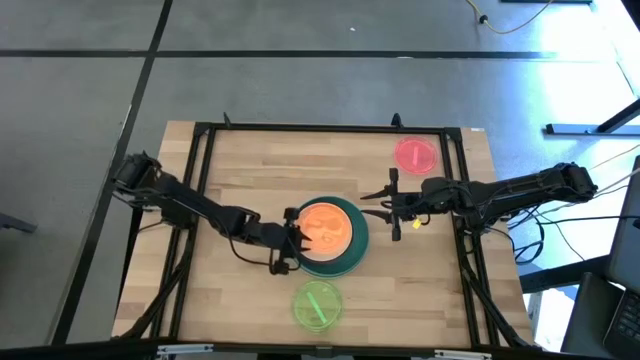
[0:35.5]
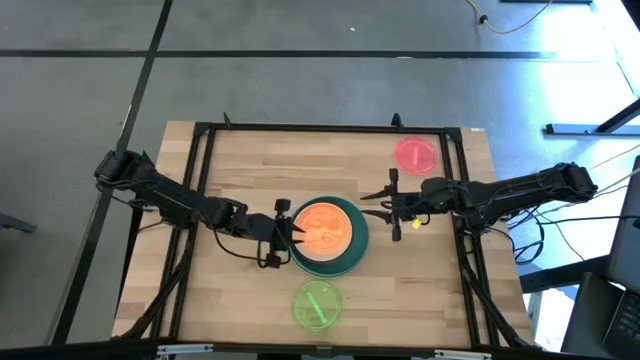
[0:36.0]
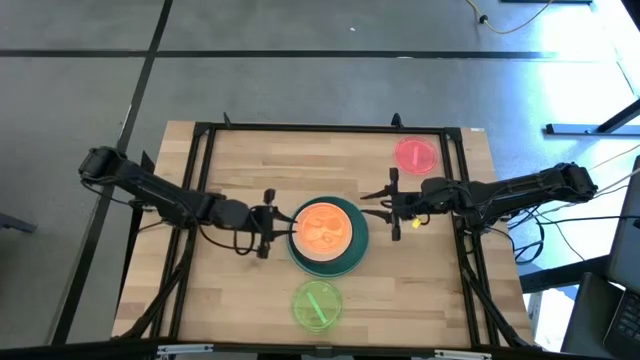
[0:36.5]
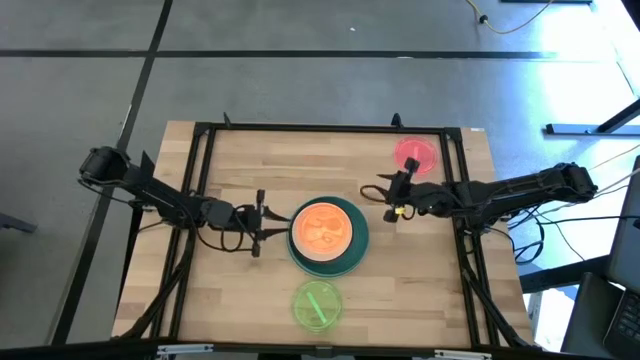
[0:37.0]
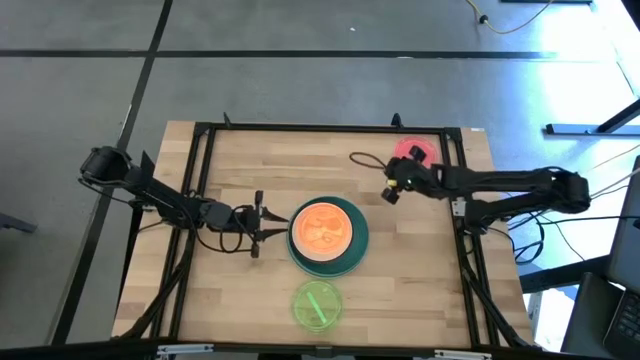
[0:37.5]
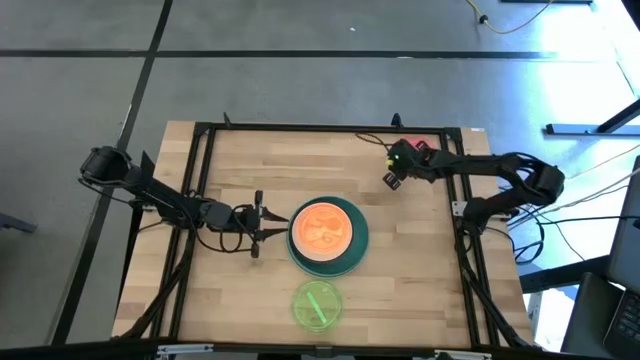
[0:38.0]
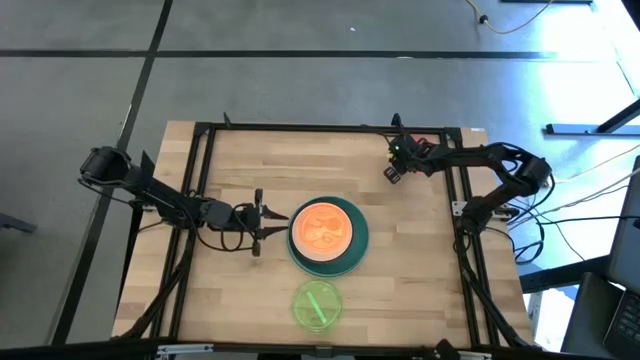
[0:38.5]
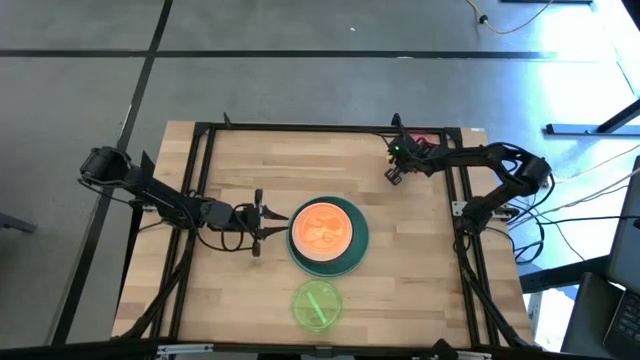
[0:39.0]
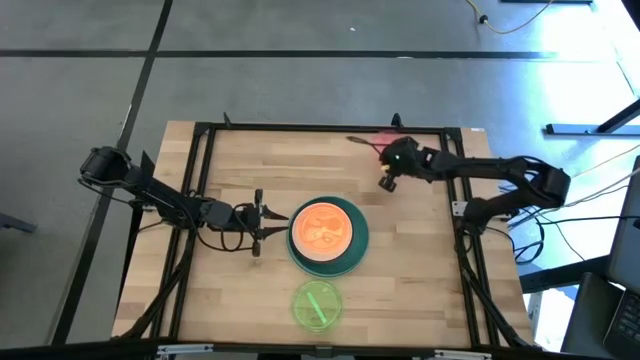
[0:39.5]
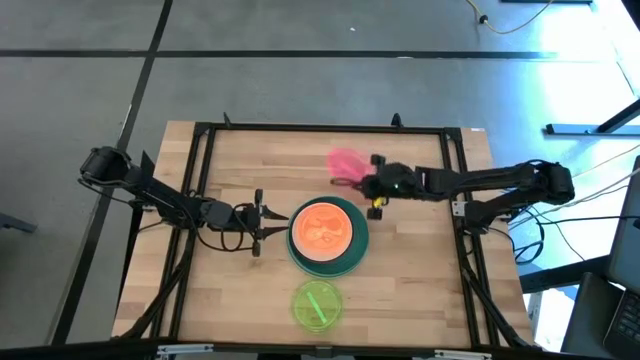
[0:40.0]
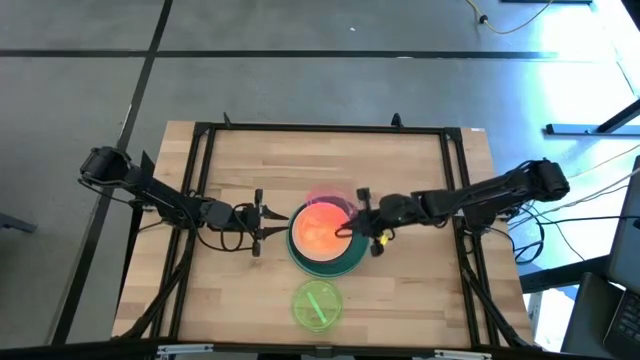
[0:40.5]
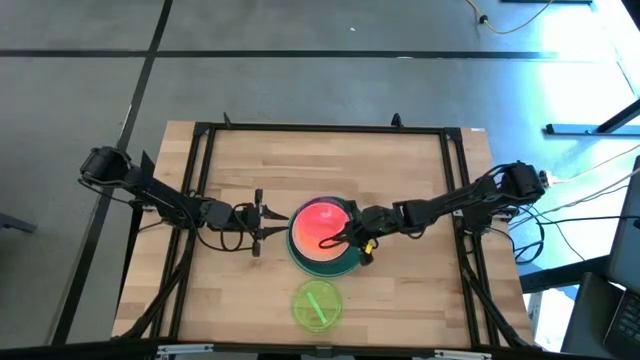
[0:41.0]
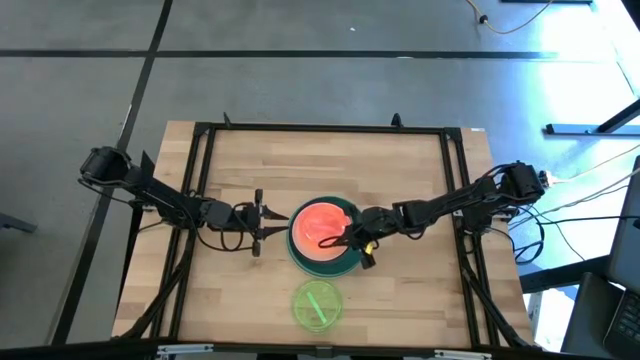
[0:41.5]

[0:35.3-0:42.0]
Task: Stack plastic plates
Stack the light pink plate on the orange plate

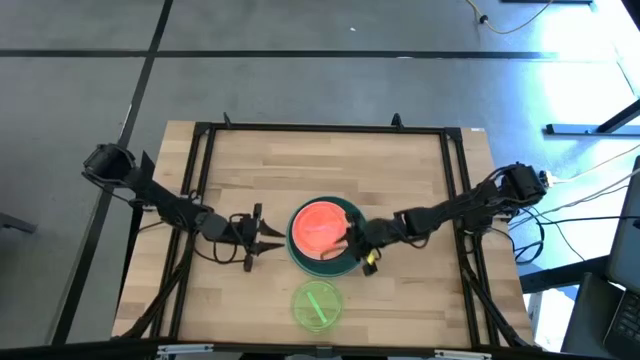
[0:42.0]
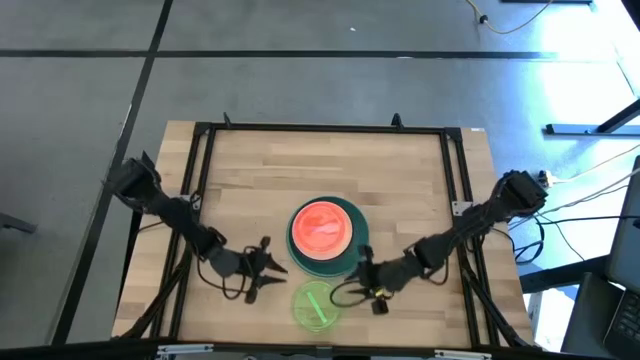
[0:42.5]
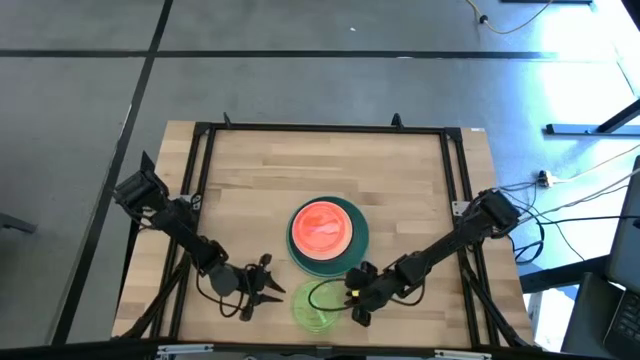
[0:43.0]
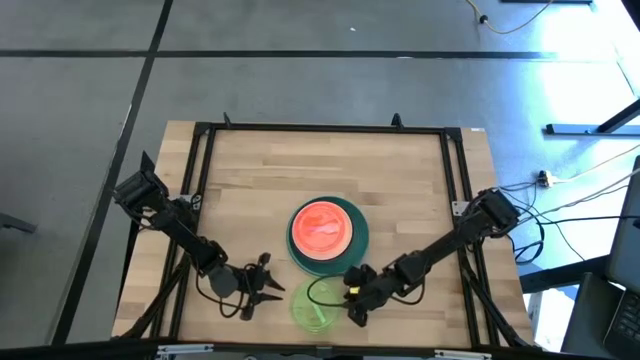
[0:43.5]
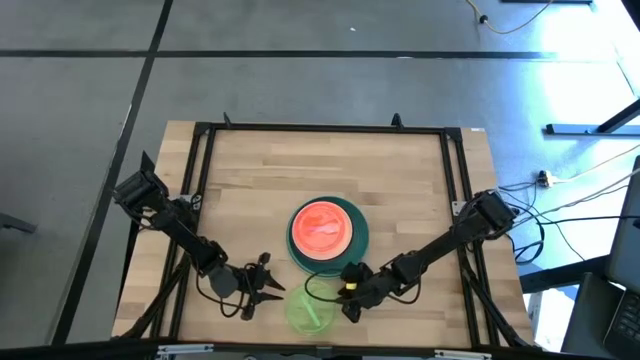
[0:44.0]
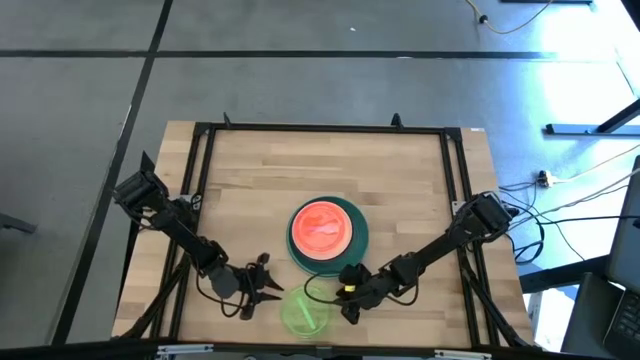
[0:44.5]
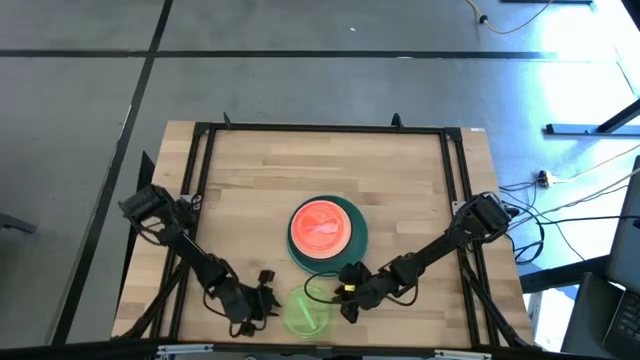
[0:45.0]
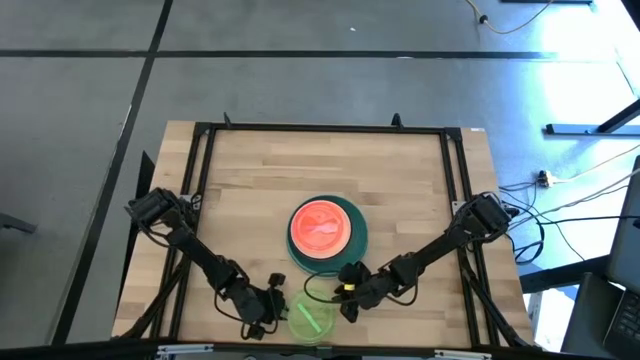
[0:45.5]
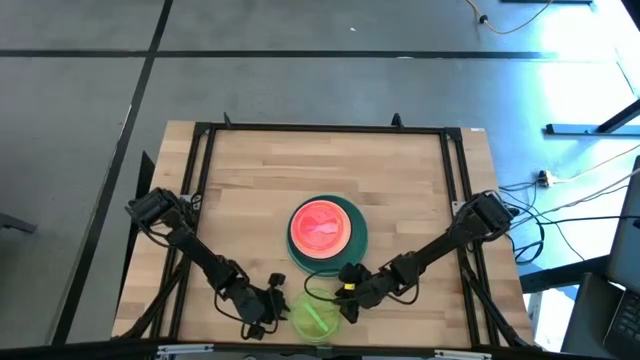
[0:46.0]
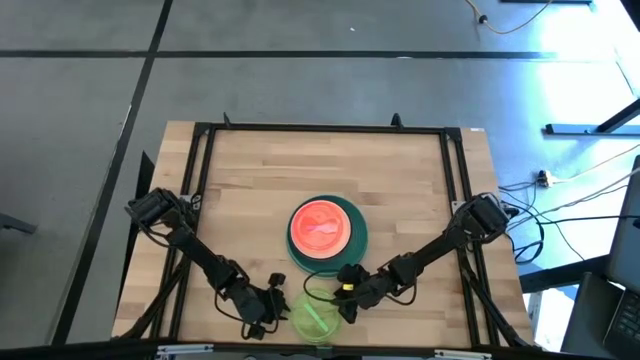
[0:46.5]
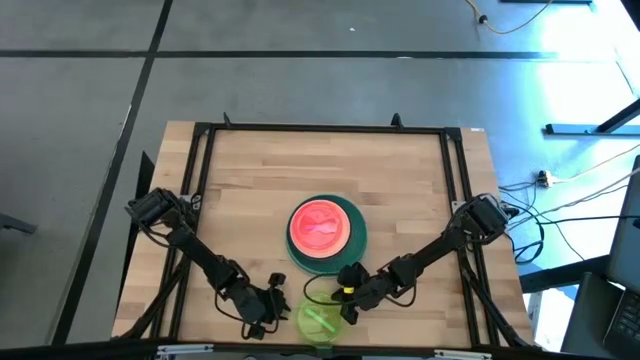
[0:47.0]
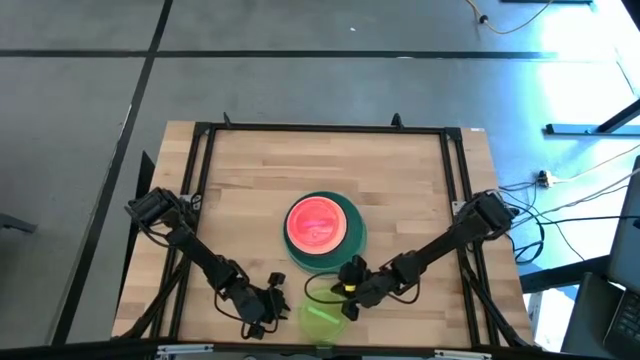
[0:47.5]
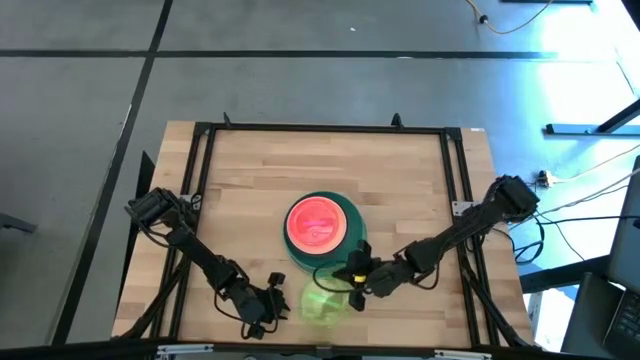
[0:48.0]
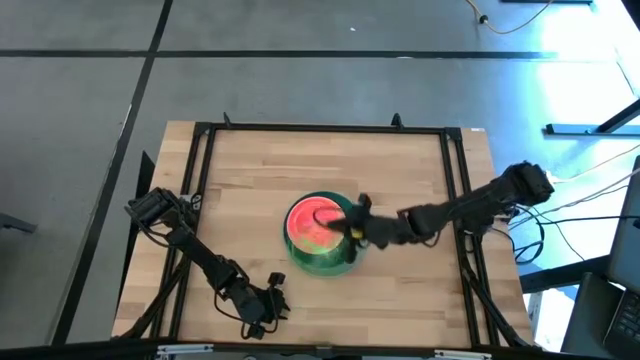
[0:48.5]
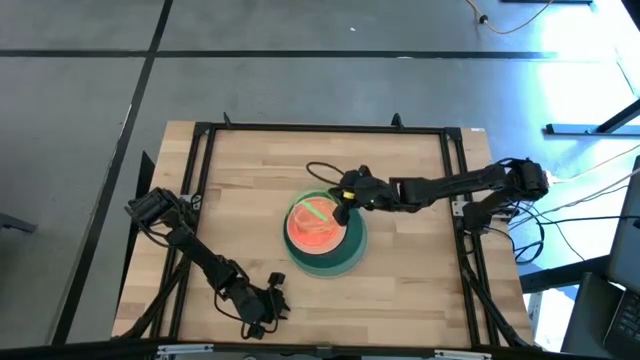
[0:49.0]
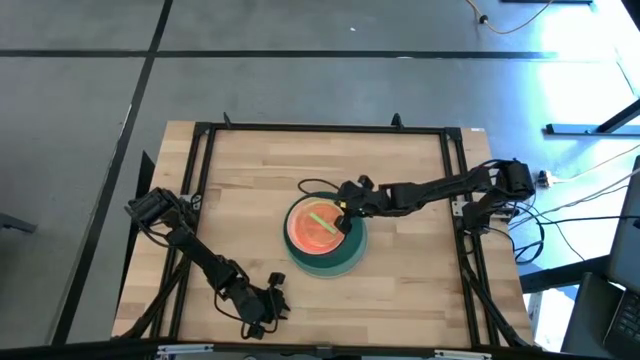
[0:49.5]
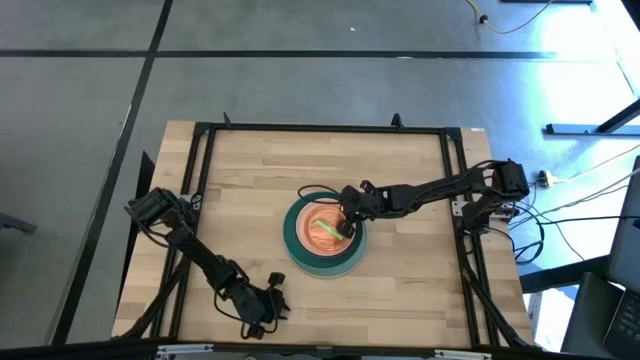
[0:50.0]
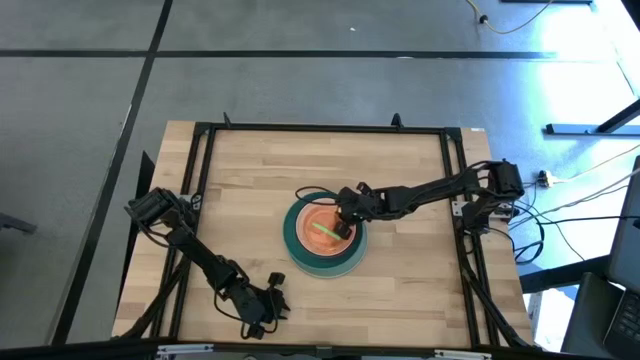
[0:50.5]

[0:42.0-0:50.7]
Stack the green bowl on the light pink plate

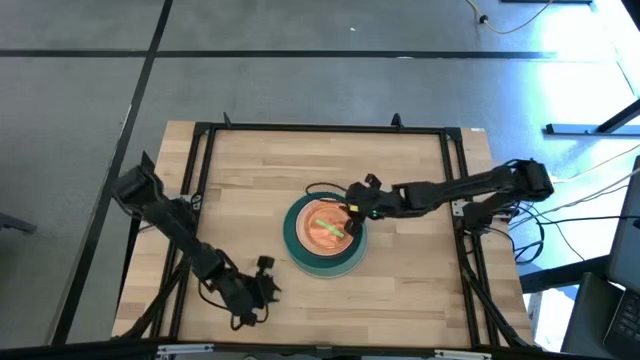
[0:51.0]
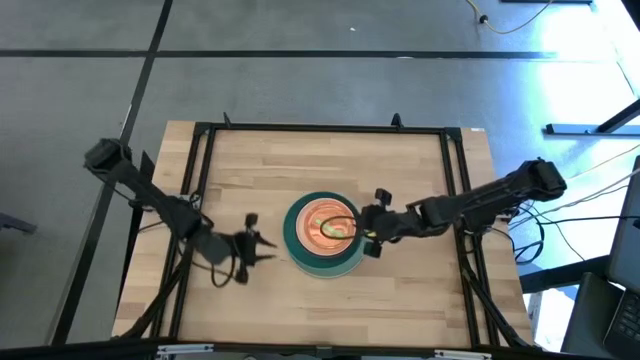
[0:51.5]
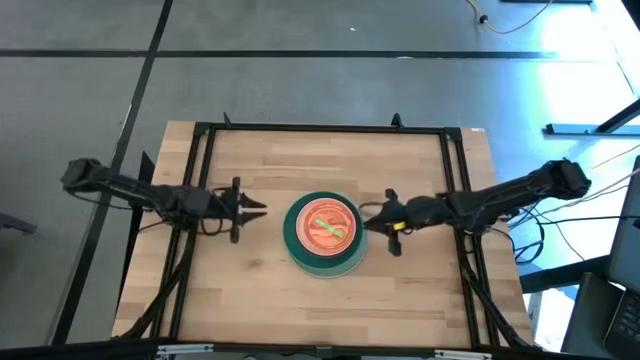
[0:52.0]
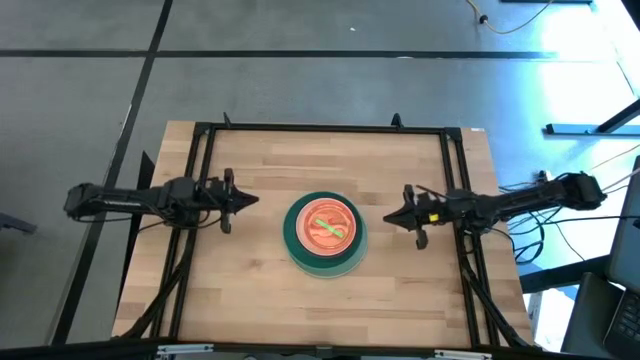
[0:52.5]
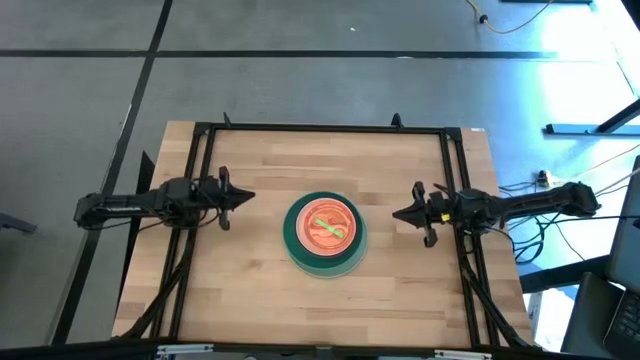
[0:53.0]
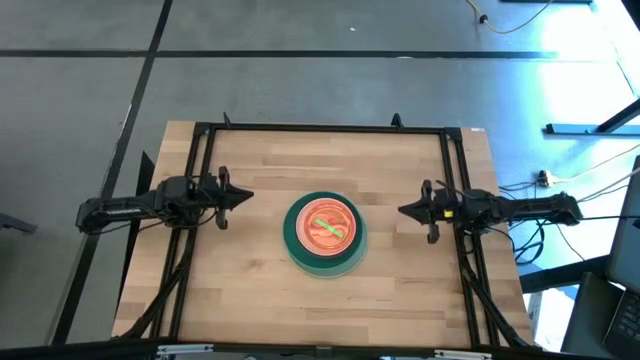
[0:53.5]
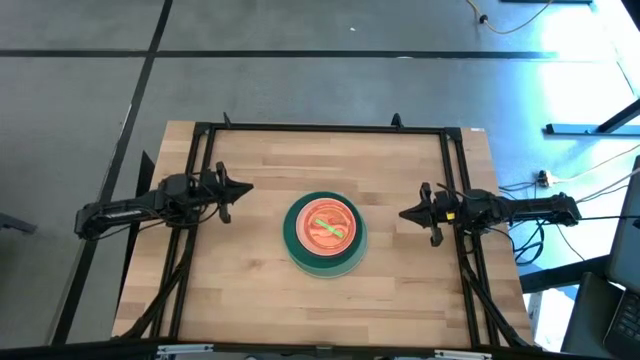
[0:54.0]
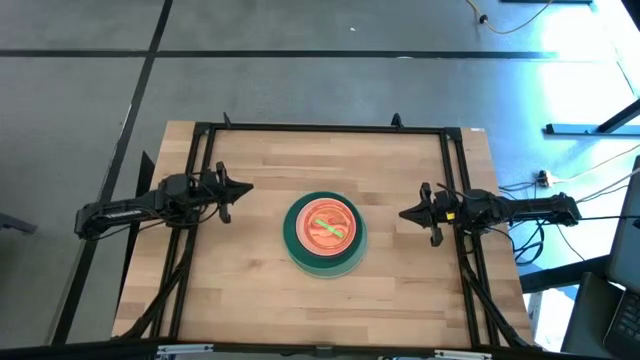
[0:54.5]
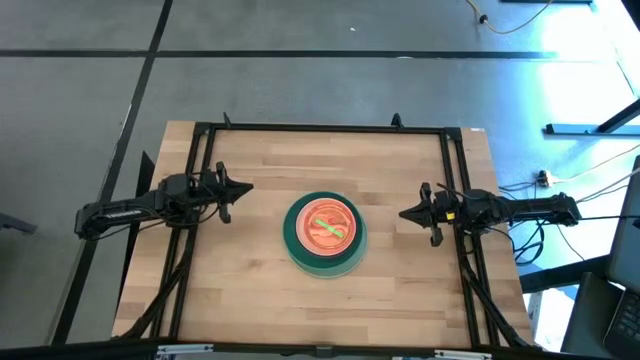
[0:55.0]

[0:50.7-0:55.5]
Return to Home Position
